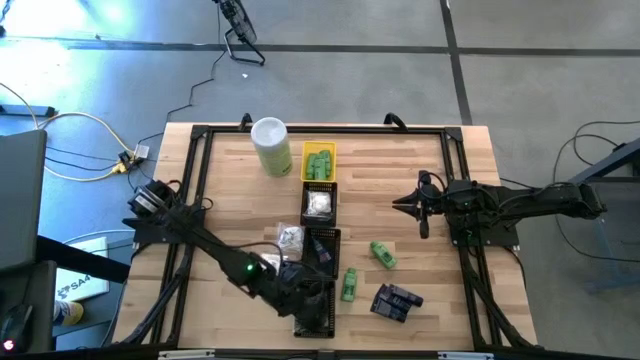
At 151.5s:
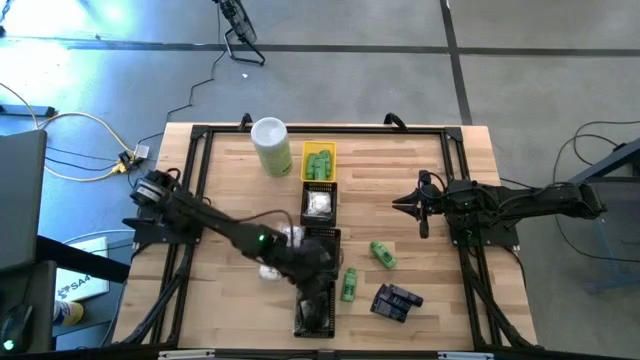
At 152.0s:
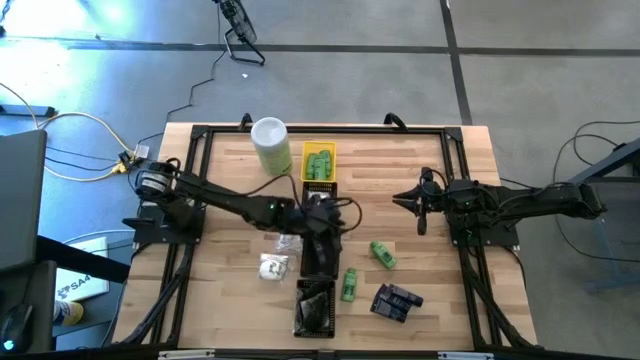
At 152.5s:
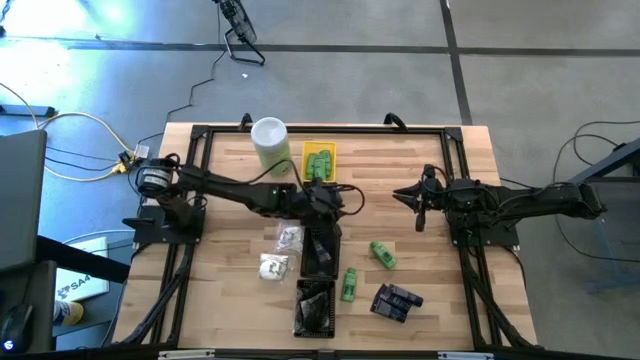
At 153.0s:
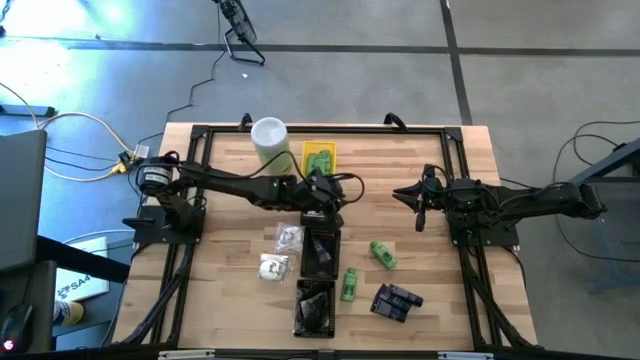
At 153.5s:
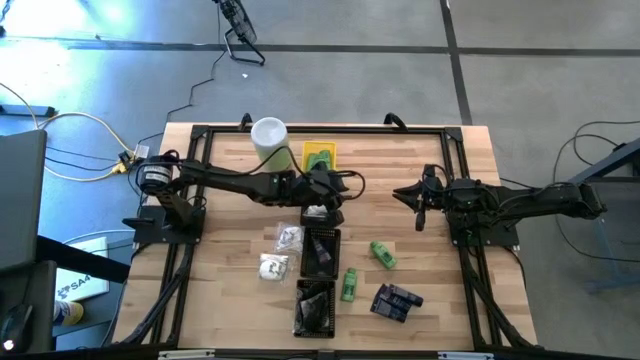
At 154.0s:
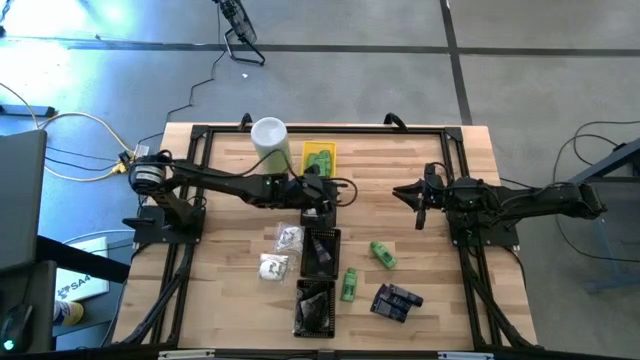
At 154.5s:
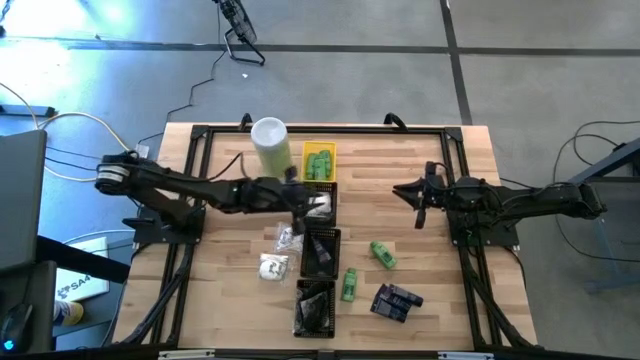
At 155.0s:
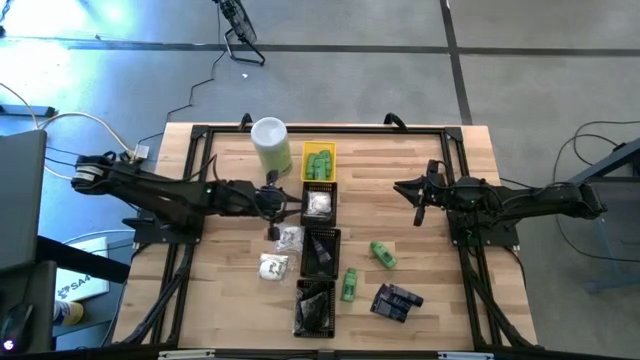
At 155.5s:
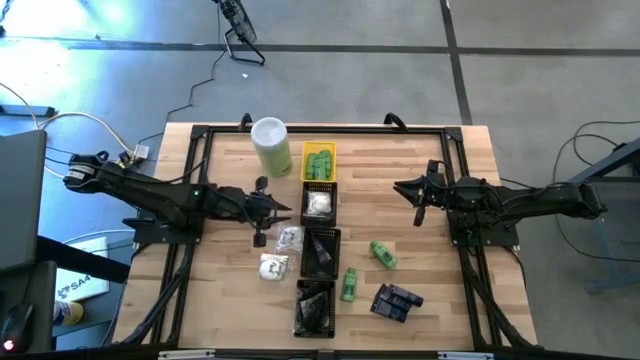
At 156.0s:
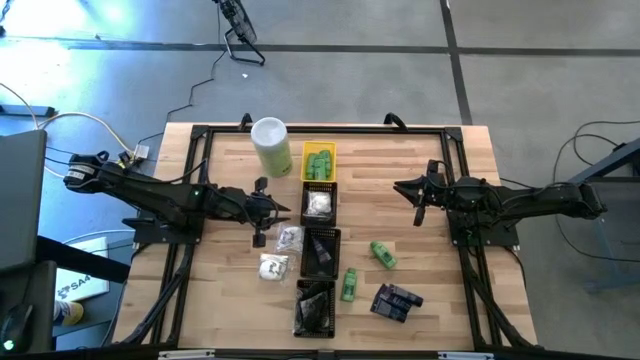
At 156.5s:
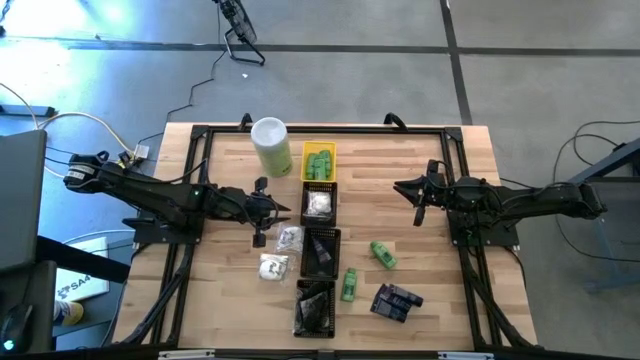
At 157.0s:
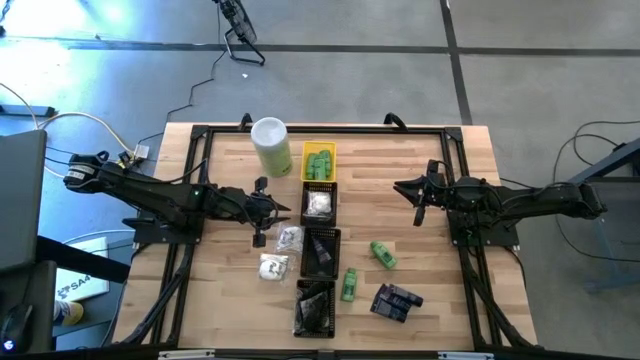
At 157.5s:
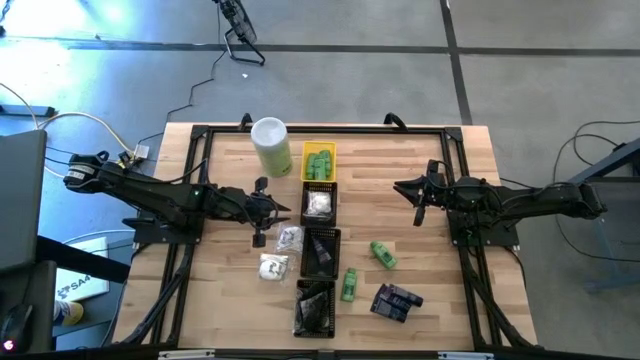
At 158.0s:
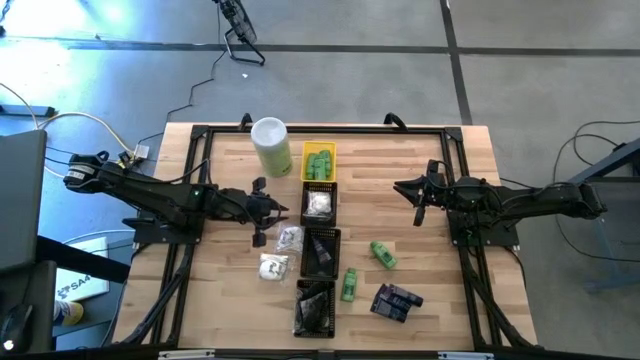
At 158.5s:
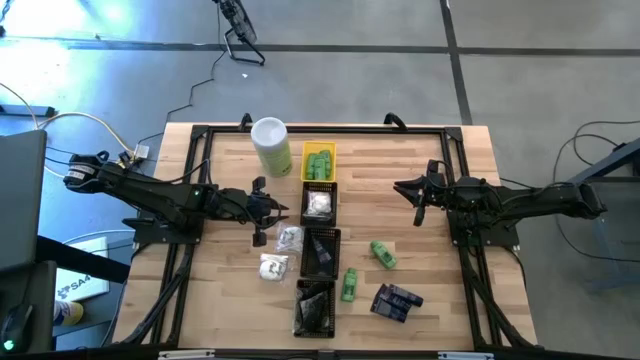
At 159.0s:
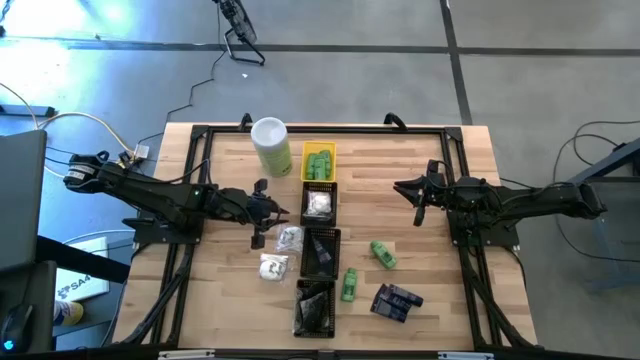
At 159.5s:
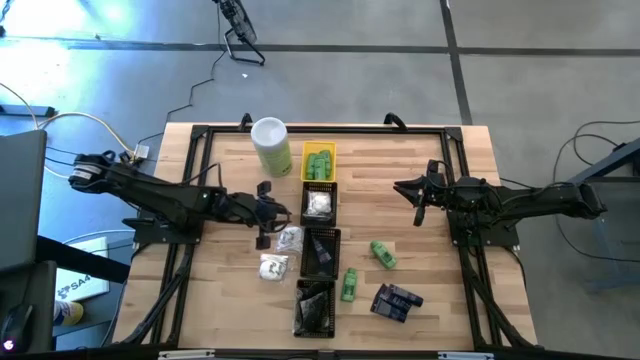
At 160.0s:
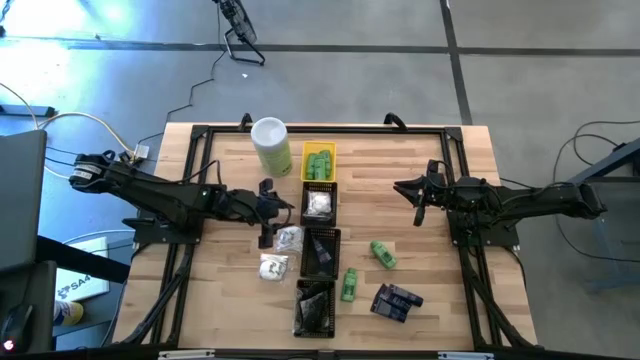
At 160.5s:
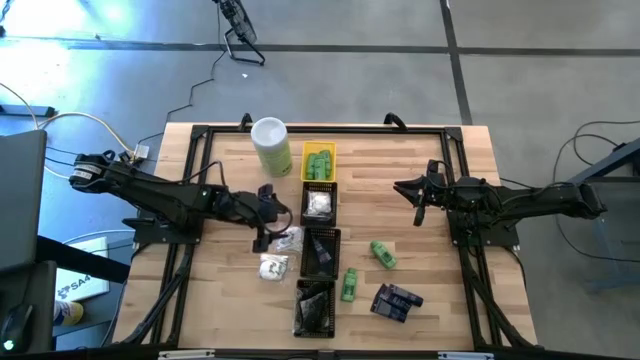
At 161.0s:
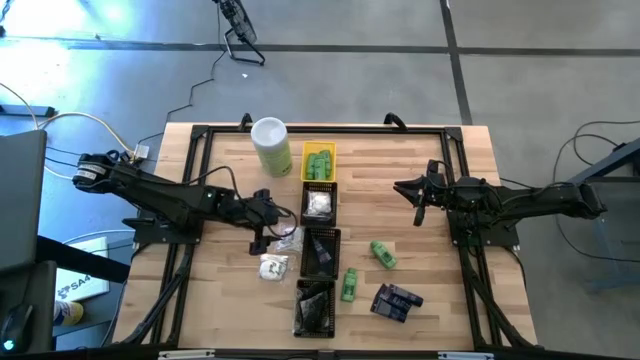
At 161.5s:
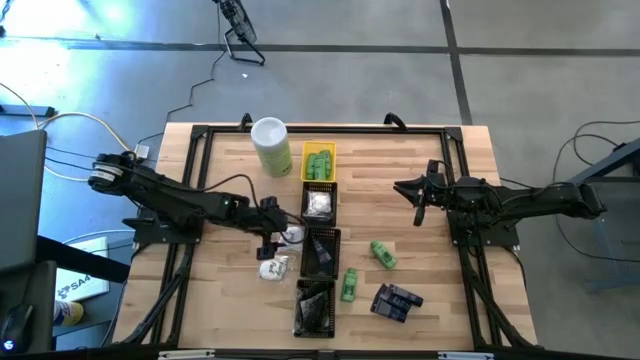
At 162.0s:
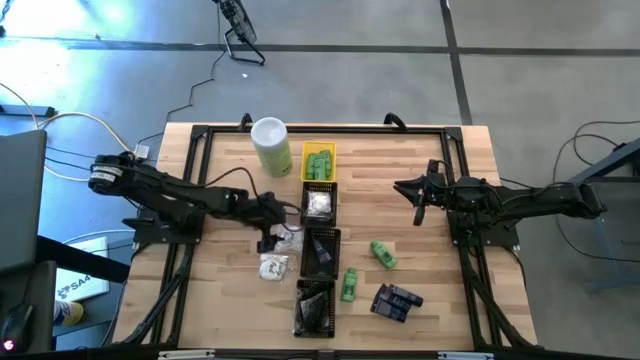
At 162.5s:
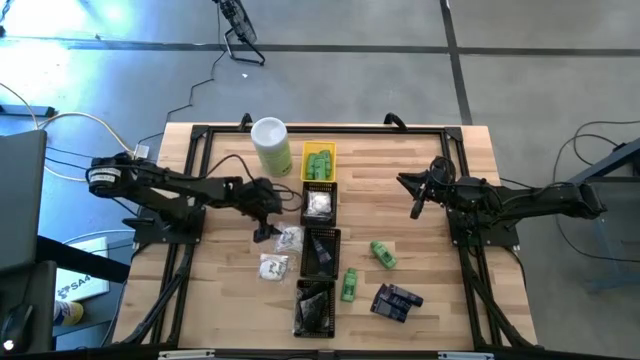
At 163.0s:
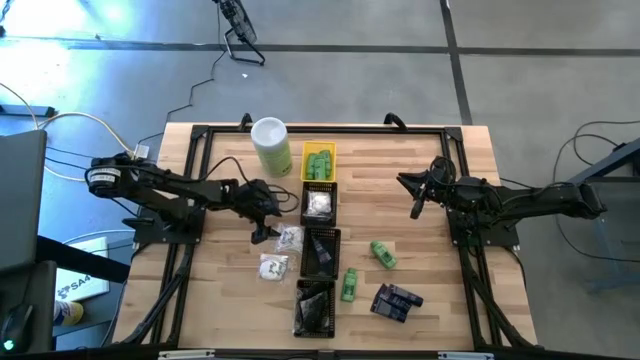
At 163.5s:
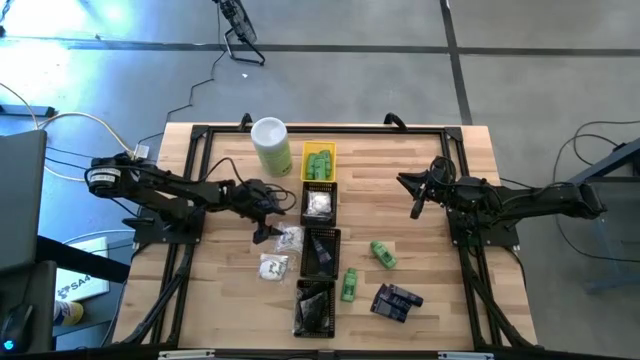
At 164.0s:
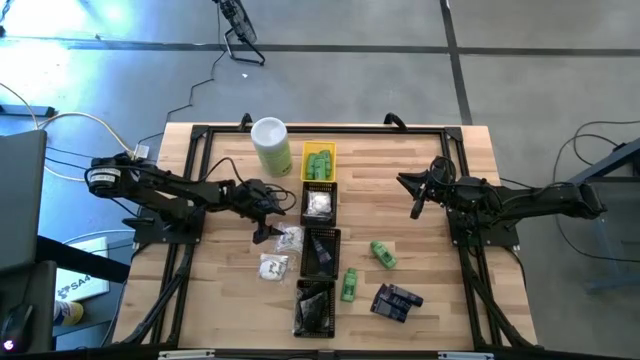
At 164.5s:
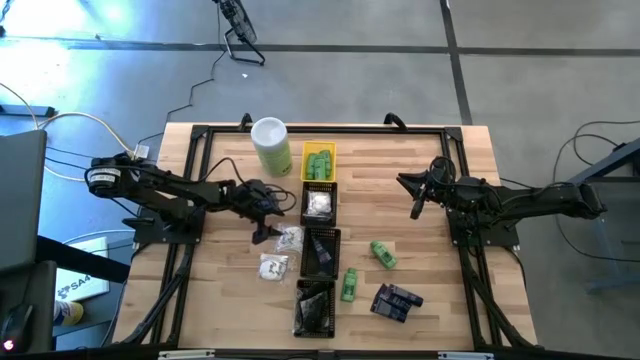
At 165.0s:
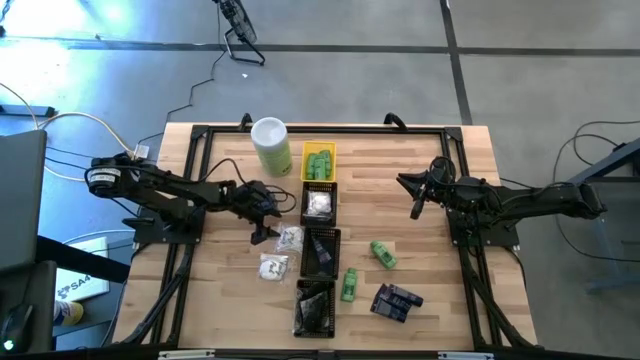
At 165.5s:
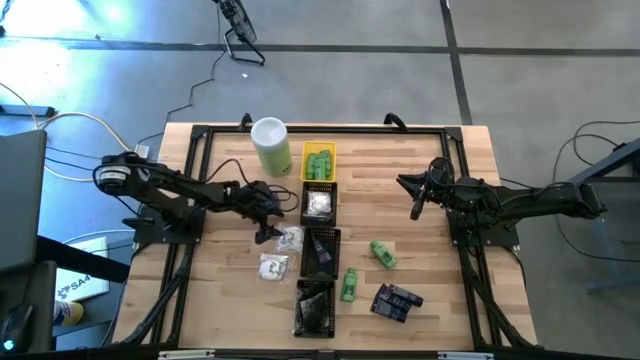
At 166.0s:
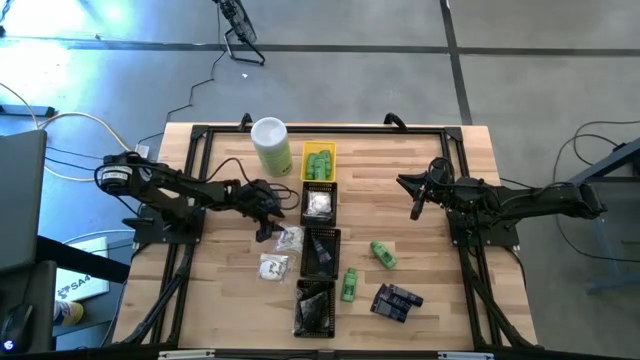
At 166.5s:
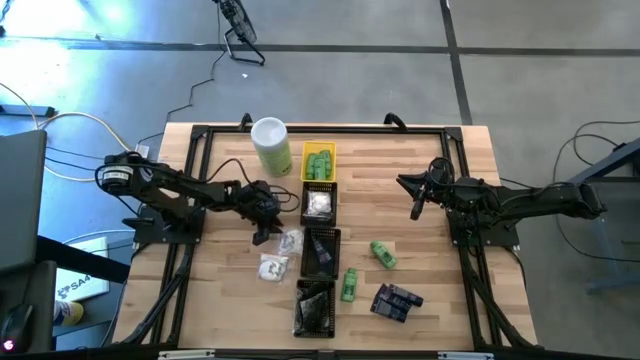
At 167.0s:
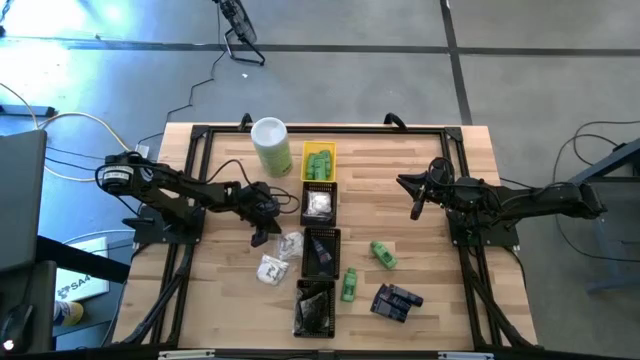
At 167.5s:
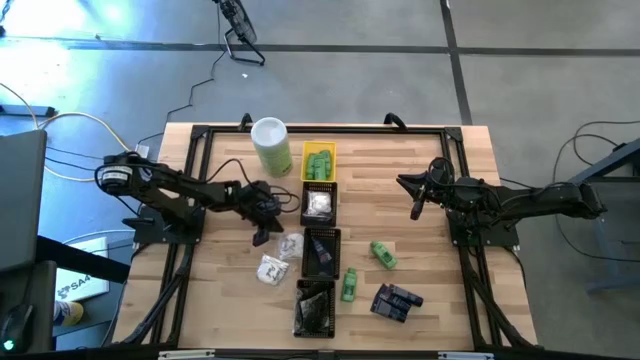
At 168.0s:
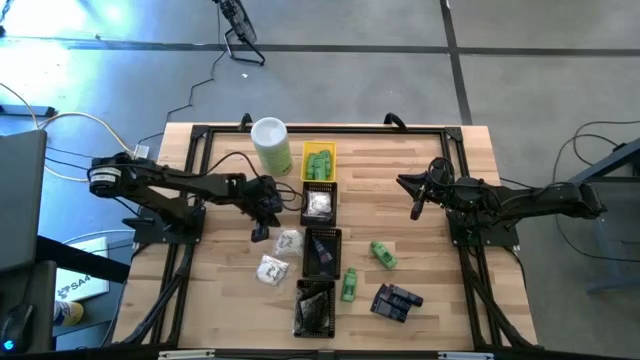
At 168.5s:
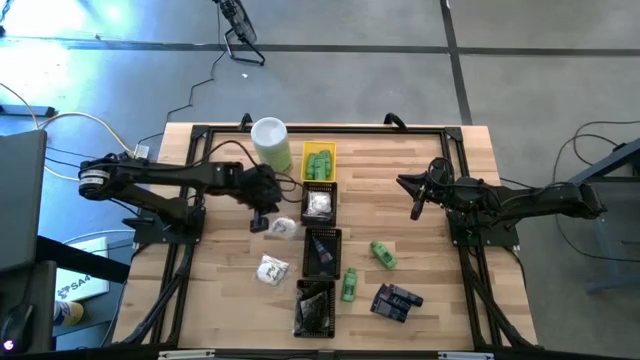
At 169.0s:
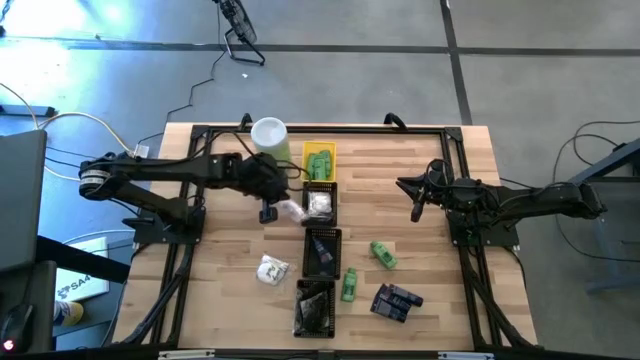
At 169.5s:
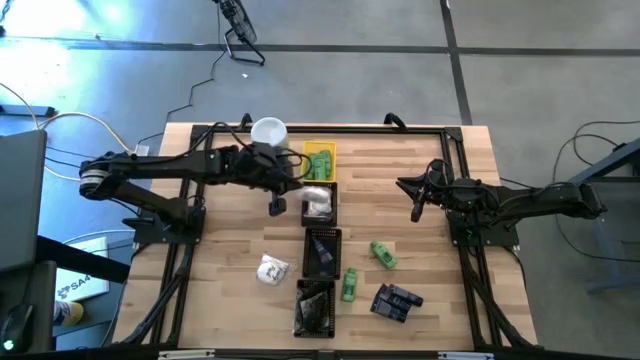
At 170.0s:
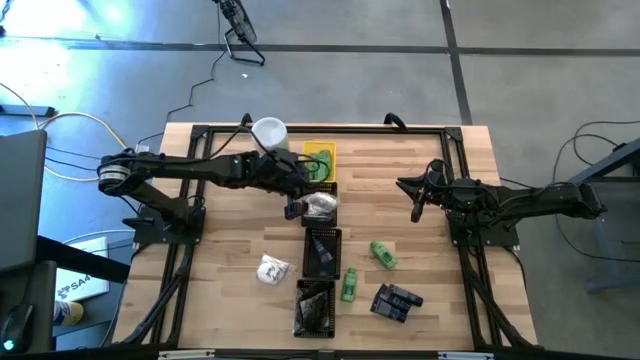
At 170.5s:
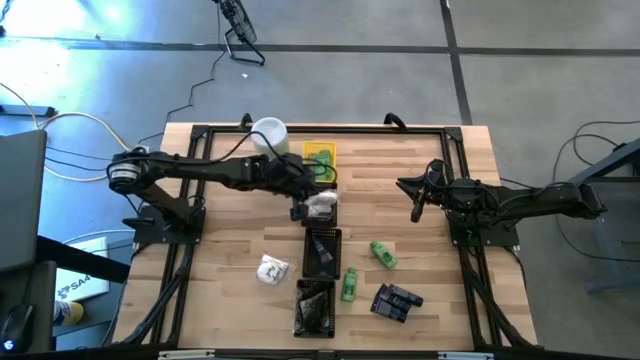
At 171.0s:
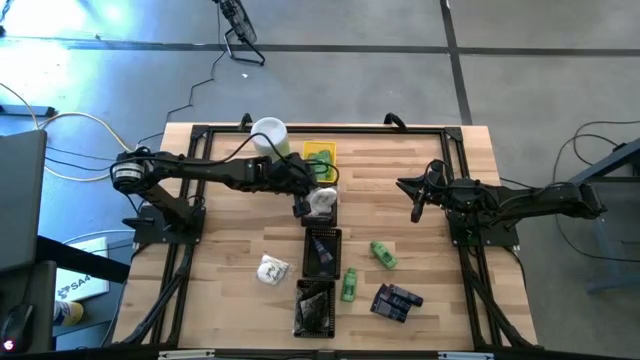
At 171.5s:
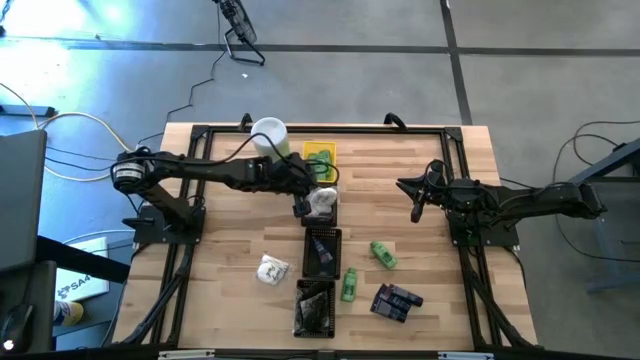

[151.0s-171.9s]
Task: Pick & Place Travel size toiletries
Put the left white vanity pack into the top black basket
